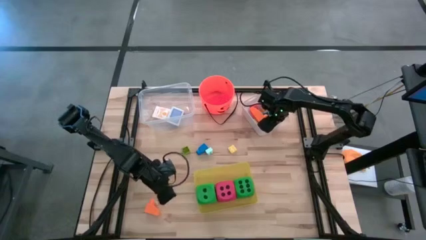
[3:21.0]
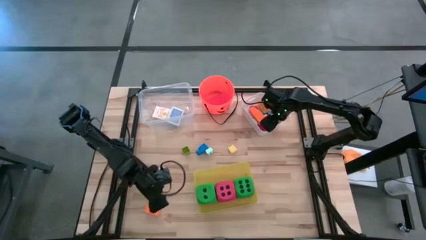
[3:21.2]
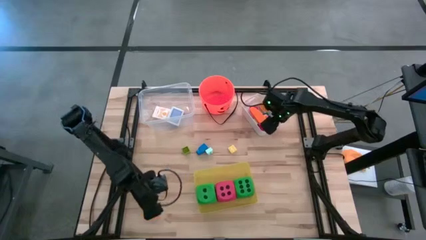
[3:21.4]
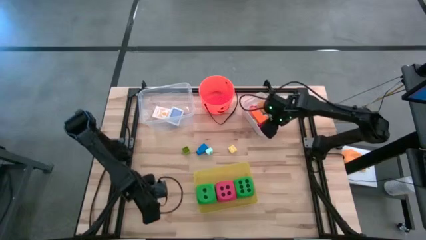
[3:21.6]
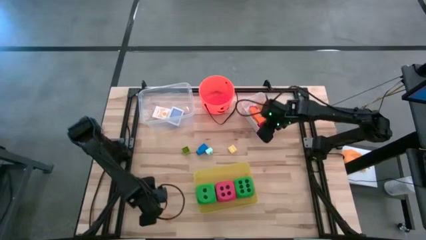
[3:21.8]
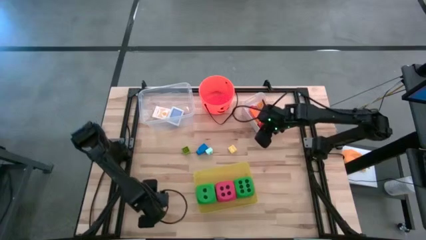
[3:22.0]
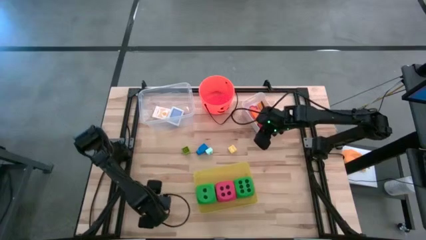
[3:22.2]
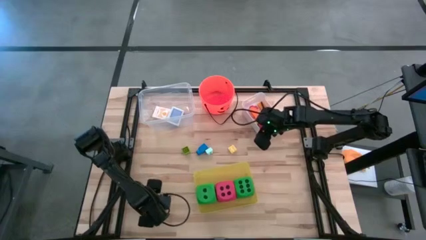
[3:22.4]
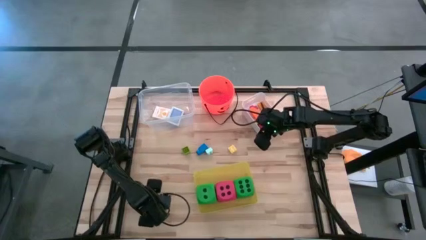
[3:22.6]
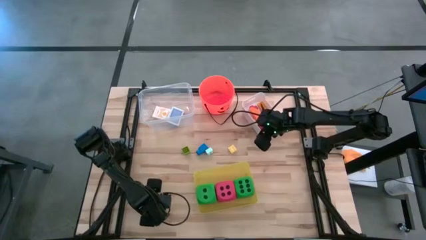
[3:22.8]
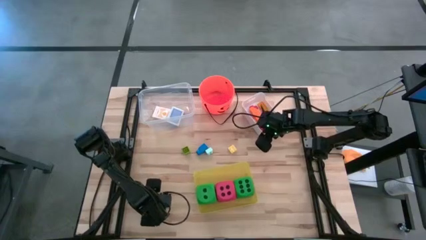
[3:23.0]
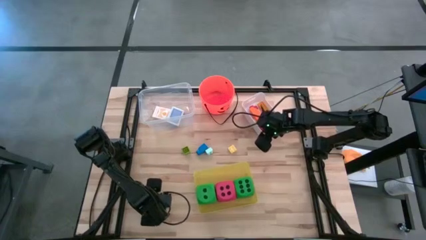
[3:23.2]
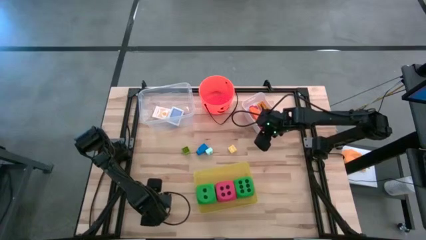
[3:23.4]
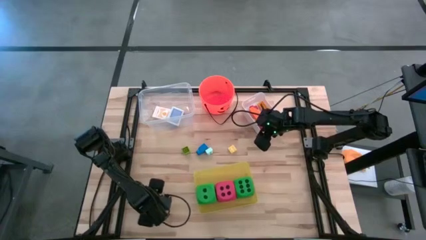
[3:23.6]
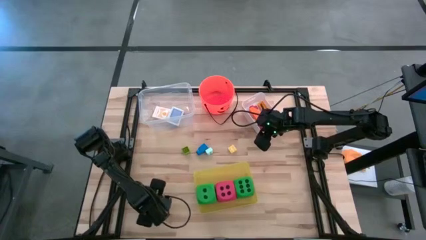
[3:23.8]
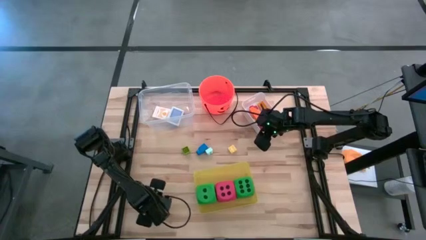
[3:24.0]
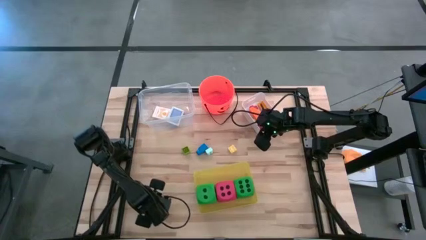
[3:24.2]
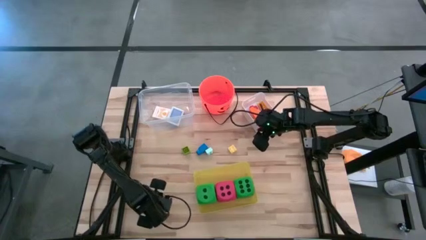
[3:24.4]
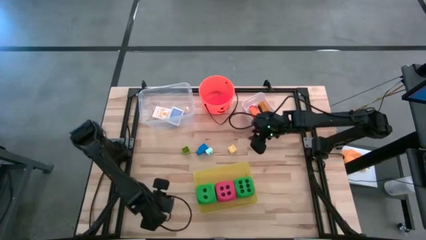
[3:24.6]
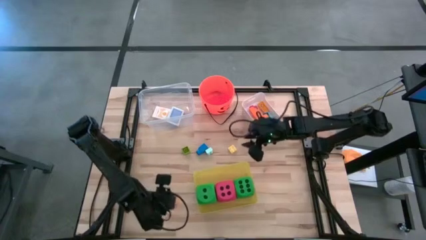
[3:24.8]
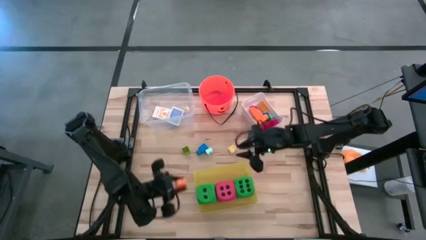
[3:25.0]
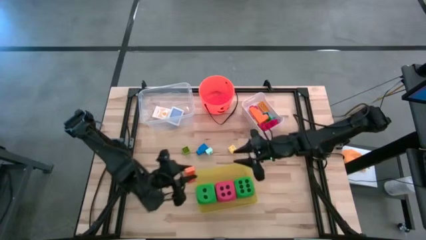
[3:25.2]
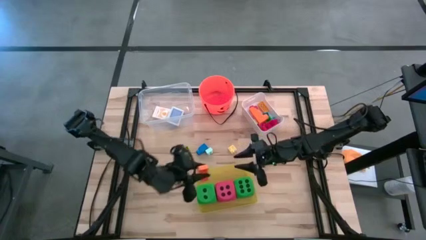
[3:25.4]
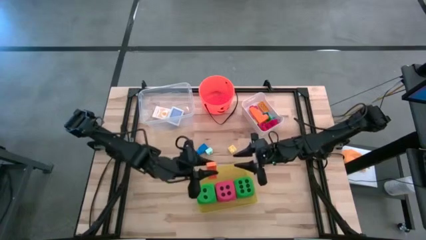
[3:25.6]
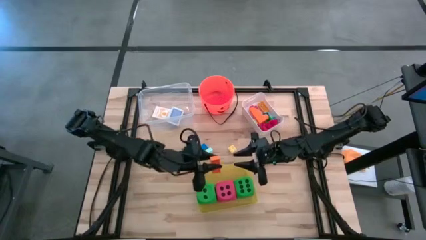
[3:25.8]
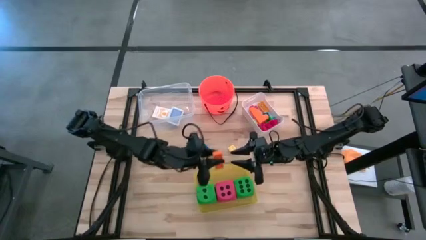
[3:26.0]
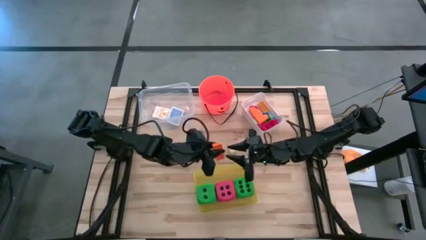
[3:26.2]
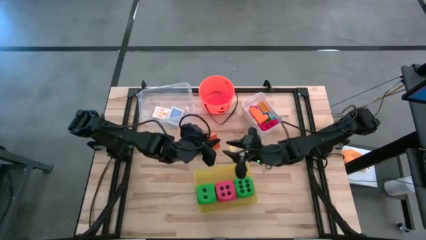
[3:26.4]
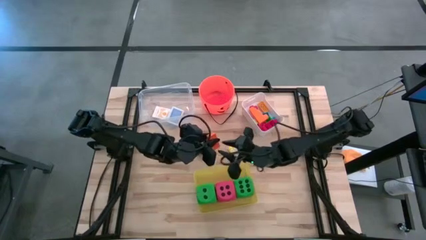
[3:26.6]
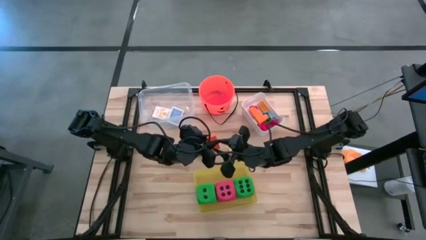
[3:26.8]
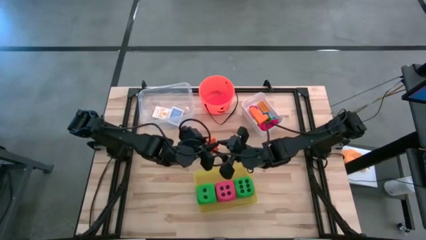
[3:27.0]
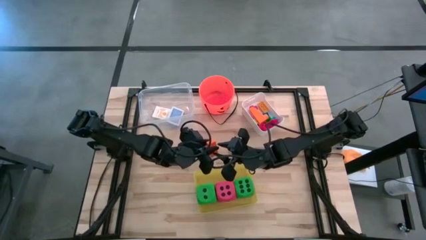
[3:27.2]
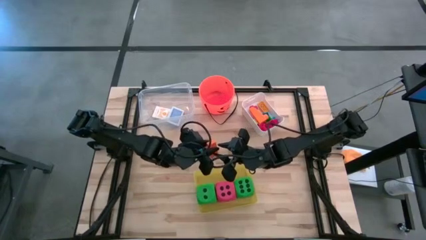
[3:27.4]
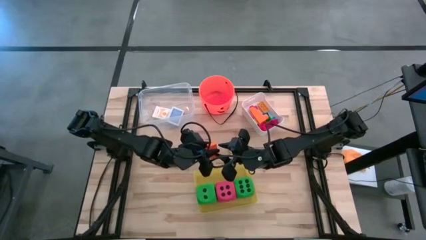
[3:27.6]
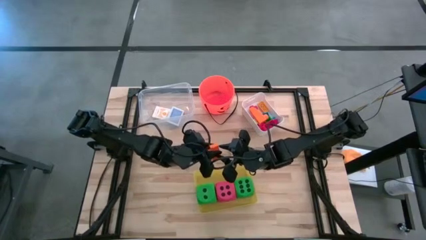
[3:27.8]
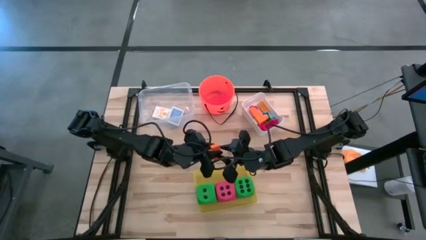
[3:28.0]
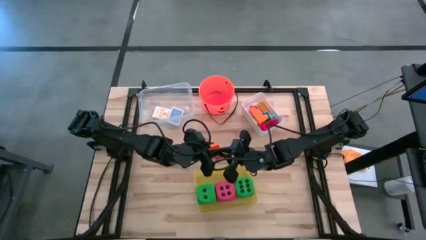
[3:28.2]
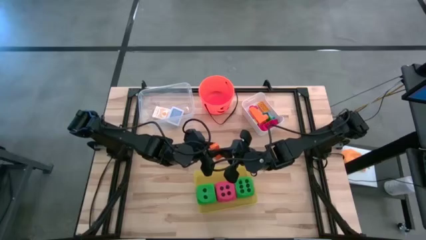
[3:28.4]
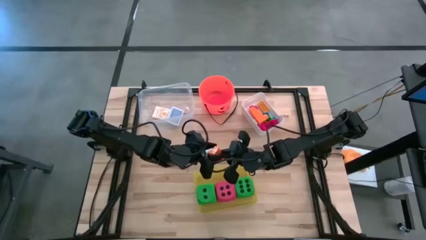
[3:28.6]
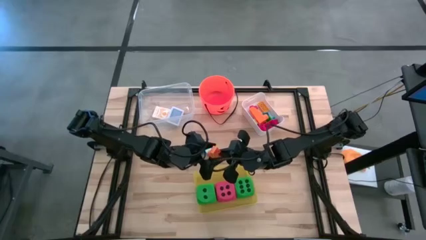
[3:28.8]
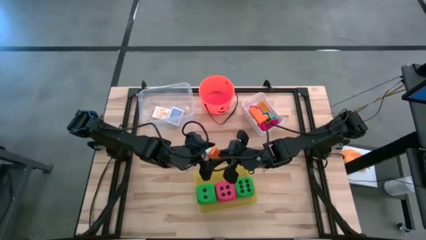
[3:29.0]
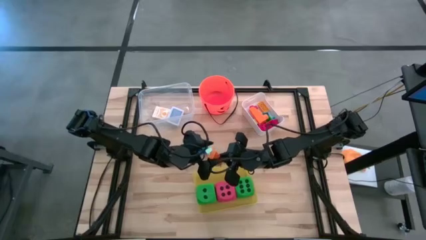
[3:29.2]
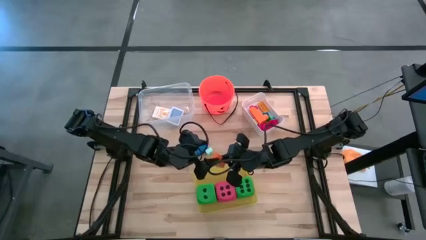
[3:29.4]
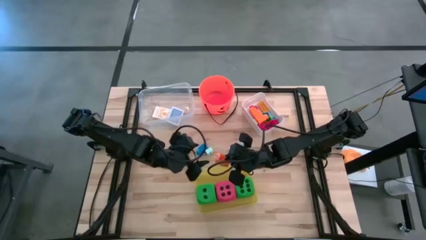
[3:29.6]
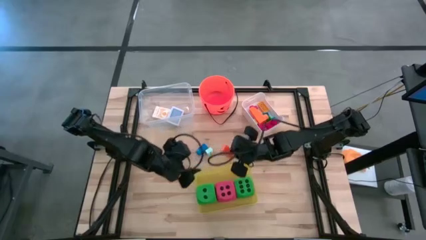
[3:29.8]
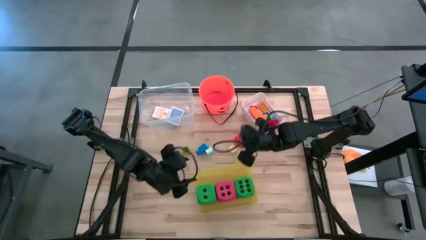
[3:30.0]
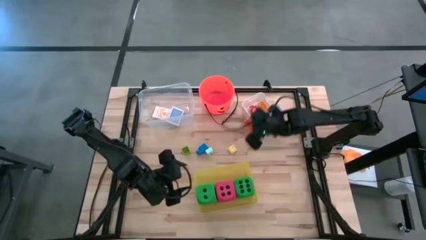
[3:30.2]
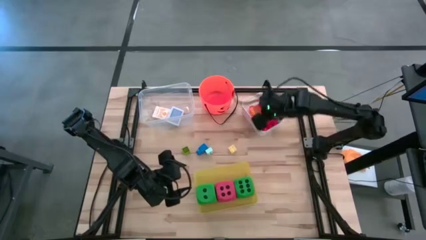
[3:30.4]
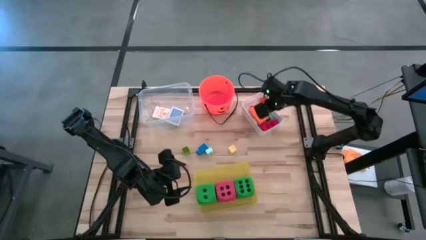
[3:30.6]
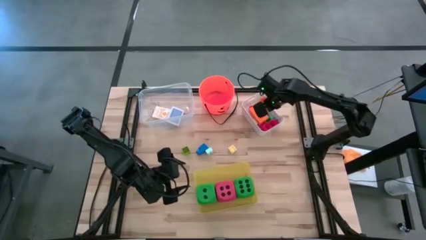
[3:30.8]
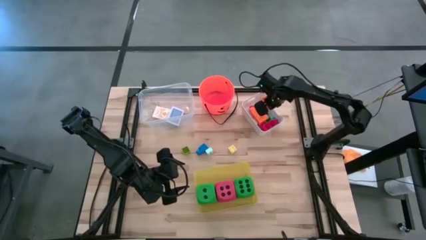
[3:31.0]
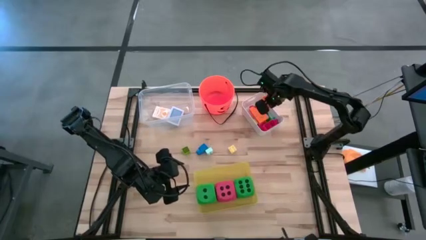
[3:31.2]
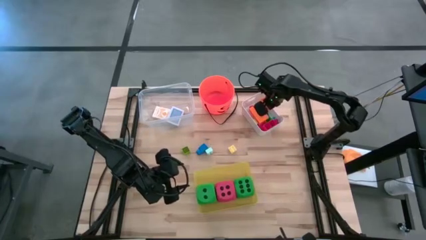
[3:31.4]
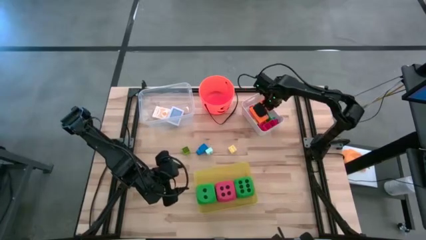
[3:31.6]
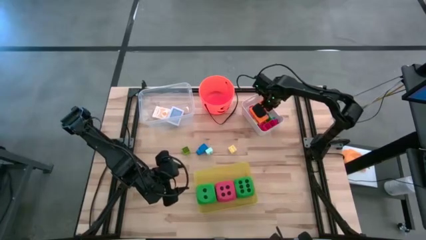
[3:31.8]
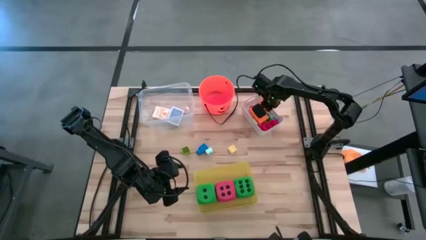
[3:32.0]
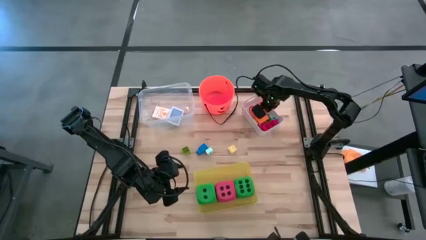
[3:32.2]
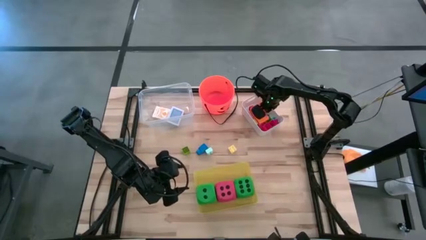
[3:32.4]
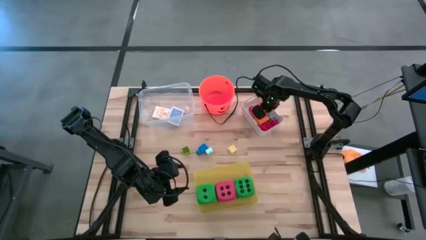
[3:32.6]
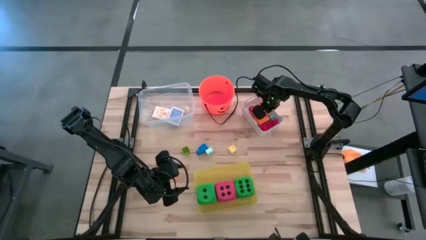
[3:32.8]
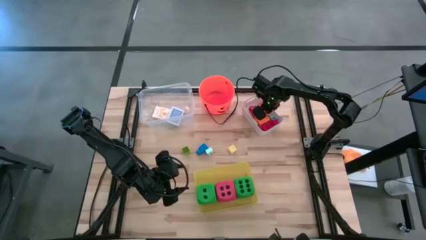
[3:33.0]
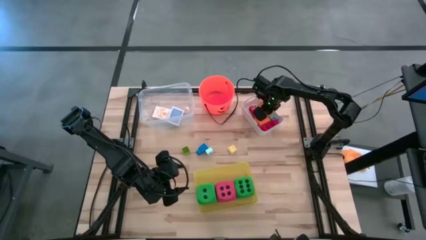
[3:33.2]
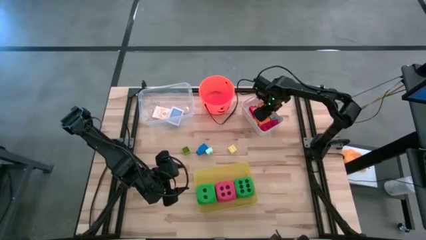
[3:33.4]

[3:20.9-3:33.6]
Task: Pick & Place Toys
Put the orange game piece into the white bin

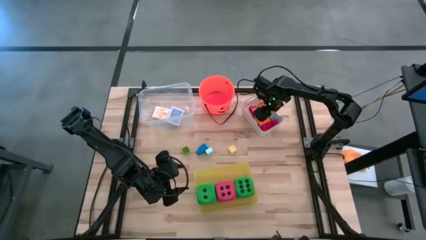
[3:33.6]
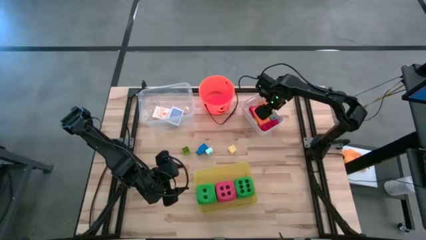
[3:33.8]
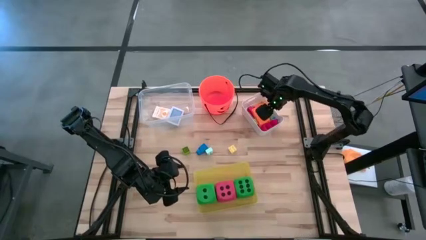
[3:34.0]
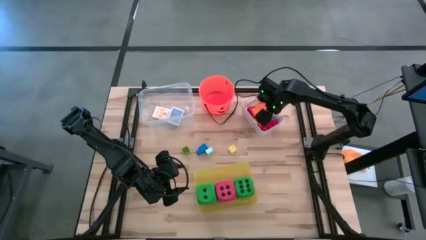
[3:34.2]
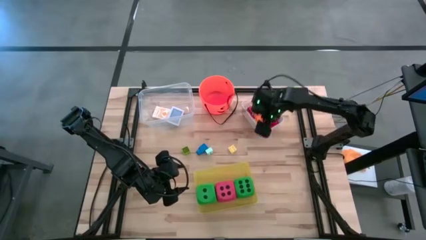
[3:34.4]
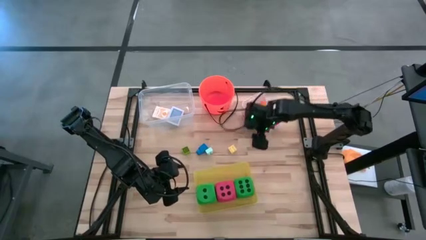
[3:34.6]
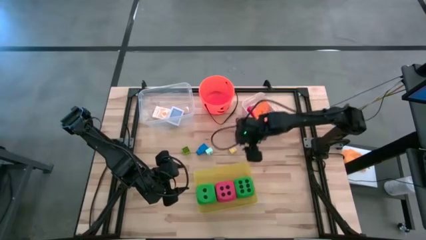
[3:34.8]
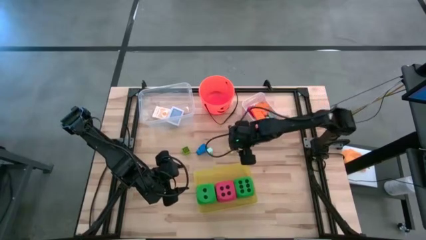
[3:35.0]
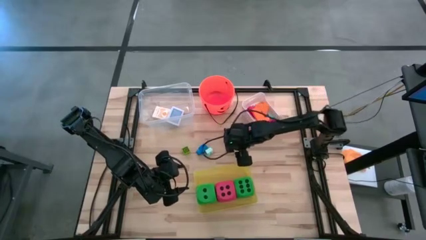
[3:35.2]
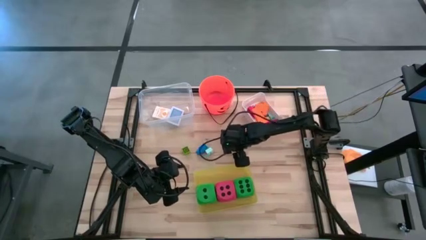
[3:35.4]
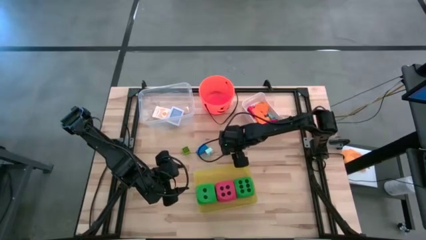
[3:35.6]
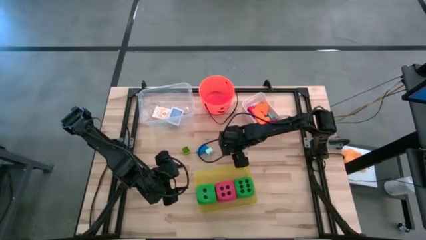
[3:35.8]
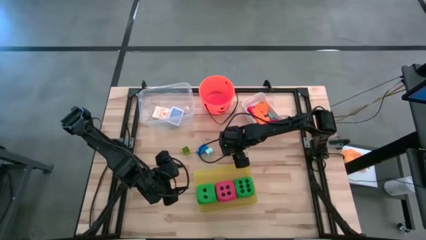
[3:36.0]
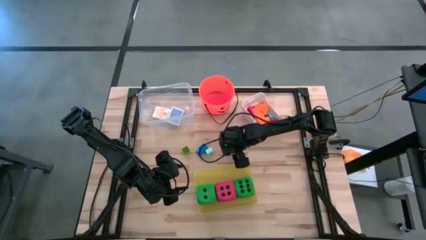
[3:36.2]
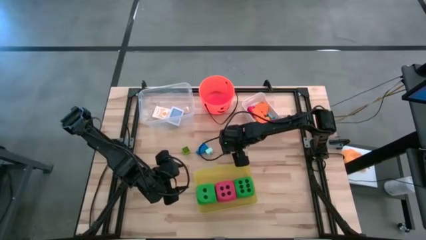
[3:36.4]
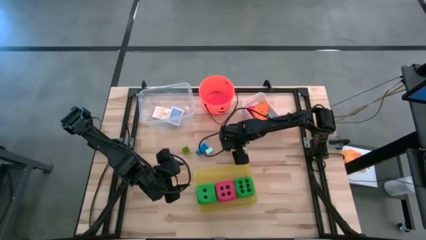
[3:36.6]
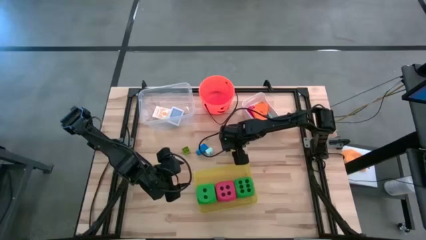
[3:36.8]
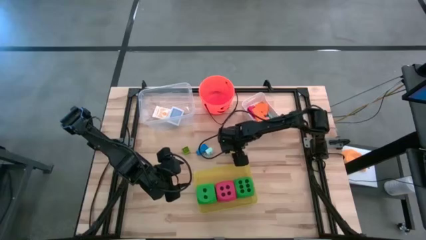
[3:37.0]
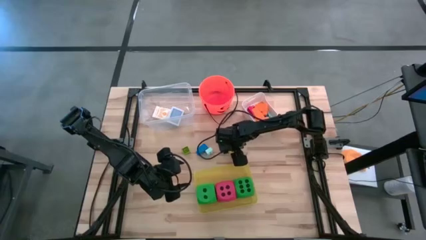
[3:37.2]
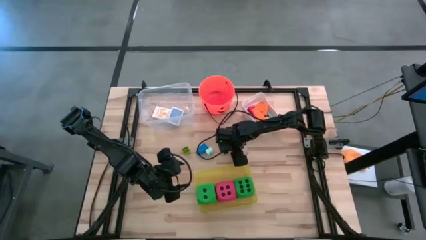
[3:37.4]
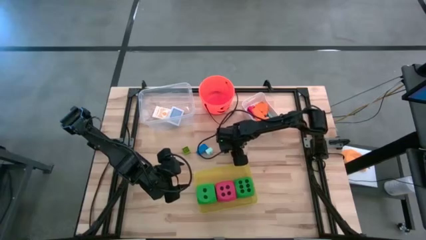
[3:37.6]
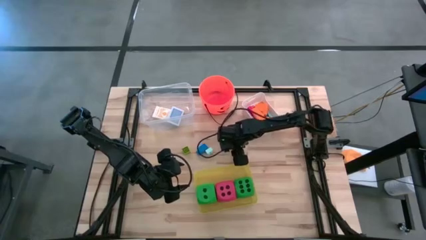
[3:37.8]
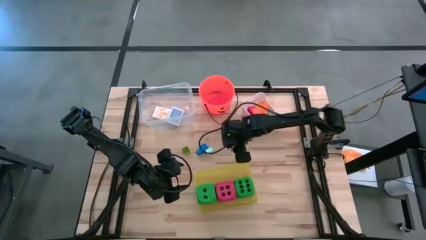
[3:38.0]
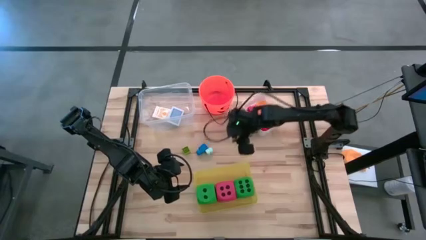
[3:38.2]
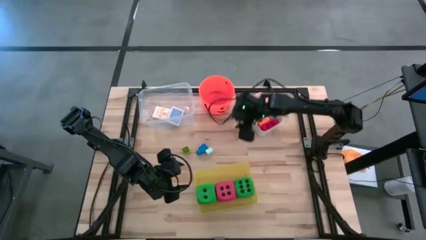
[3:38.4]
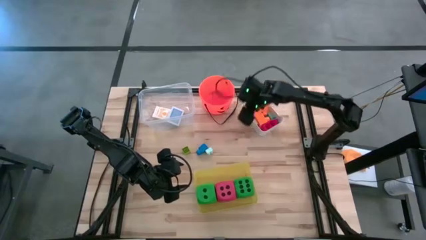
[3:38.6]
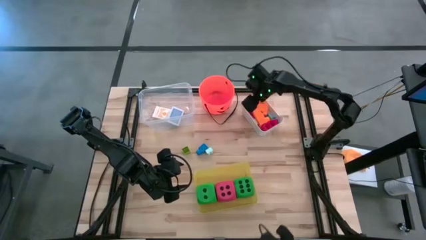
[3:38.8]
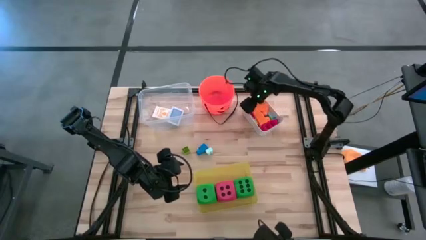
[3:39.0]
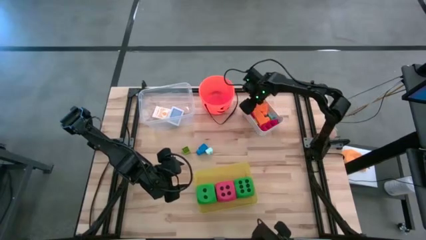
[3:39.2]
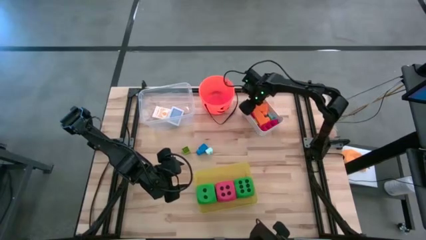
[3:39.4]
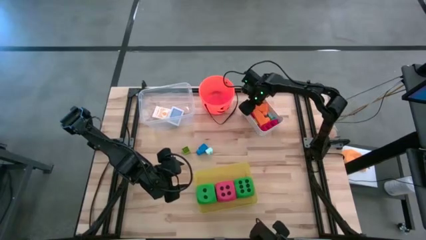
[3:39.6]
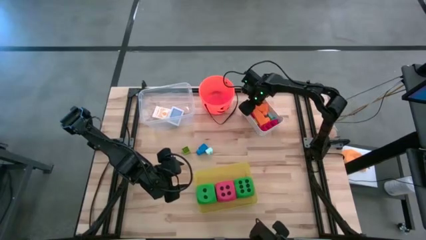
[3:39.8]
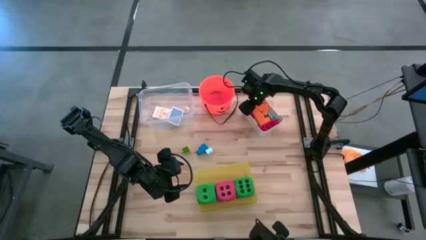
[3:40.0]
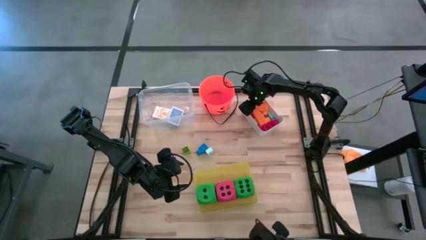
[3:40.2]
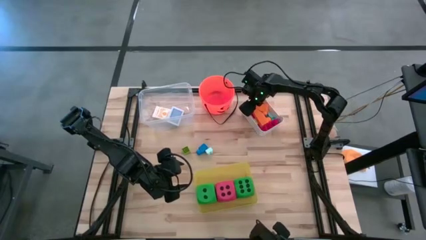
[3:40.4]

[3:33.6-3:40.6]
Put the light yellow game piece into the white bin
